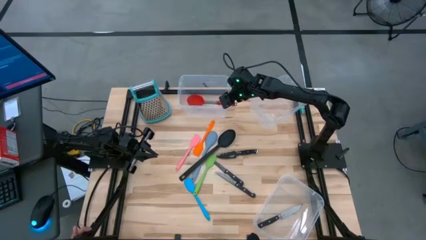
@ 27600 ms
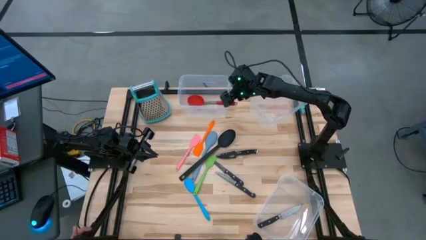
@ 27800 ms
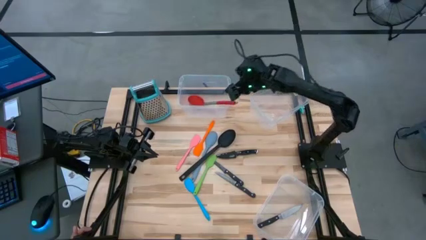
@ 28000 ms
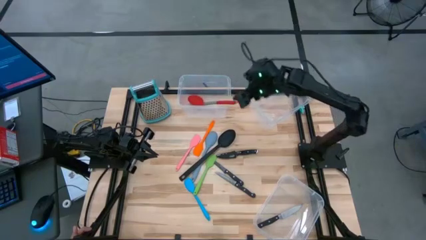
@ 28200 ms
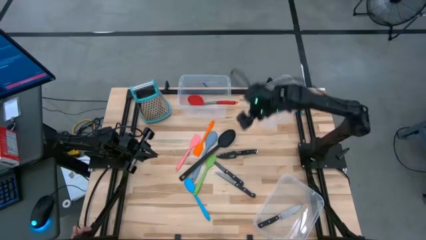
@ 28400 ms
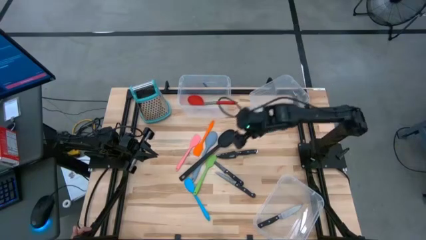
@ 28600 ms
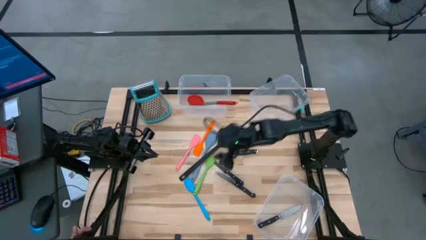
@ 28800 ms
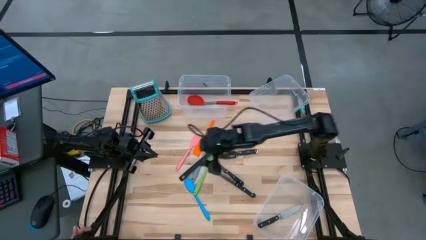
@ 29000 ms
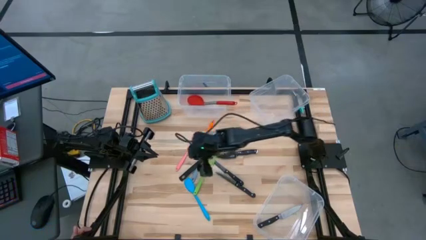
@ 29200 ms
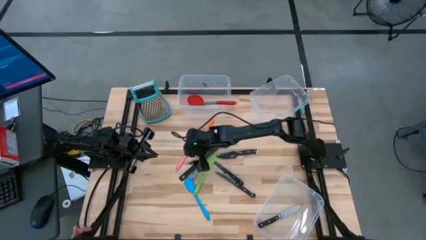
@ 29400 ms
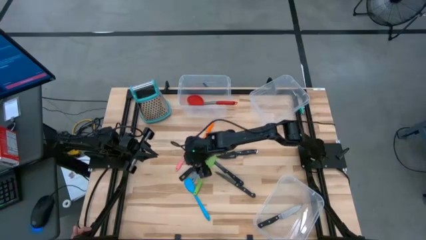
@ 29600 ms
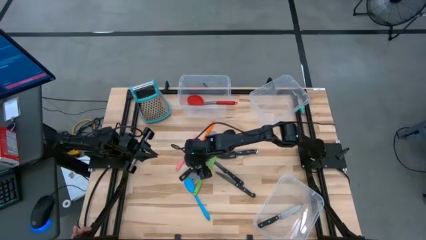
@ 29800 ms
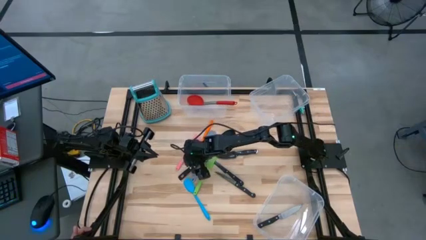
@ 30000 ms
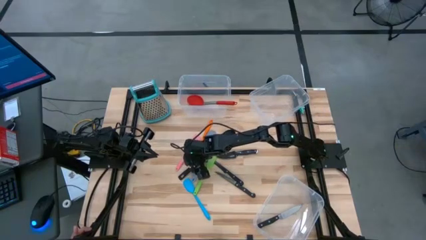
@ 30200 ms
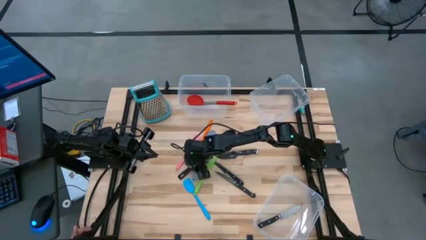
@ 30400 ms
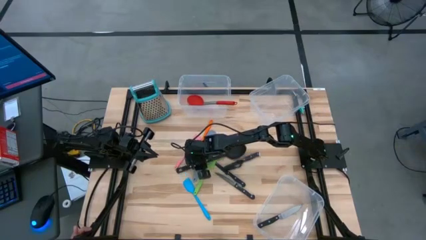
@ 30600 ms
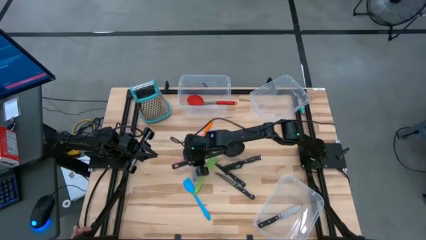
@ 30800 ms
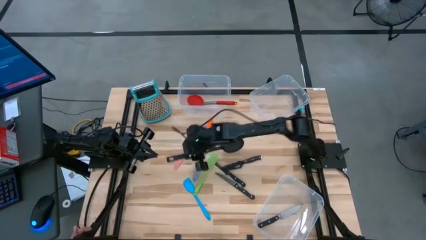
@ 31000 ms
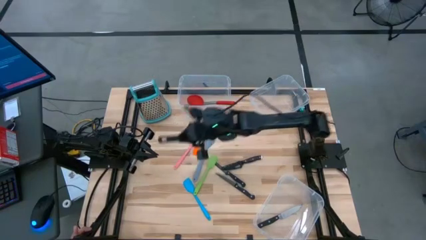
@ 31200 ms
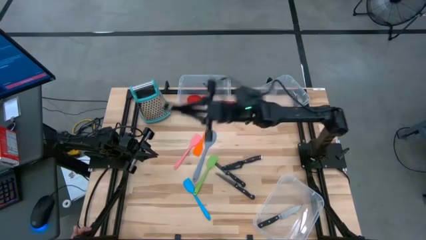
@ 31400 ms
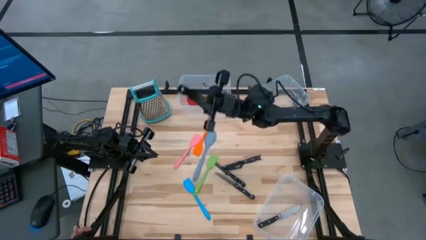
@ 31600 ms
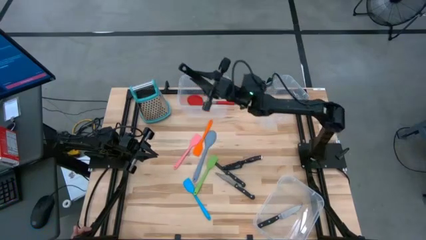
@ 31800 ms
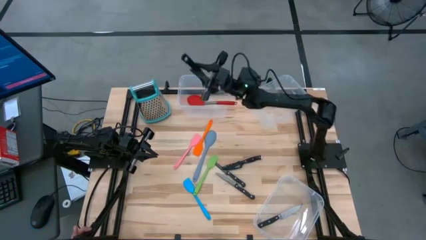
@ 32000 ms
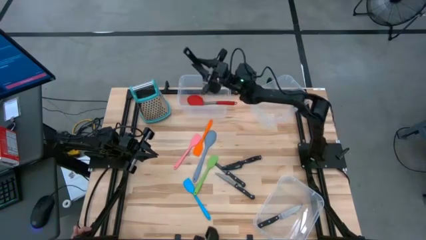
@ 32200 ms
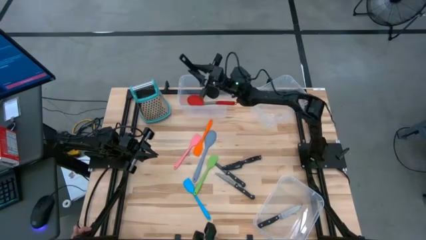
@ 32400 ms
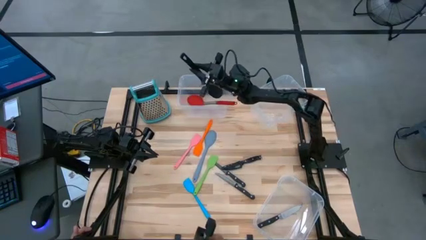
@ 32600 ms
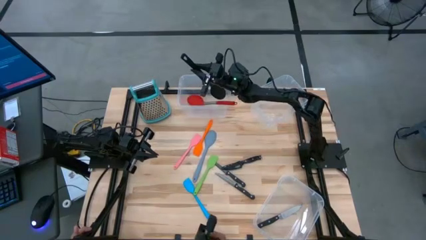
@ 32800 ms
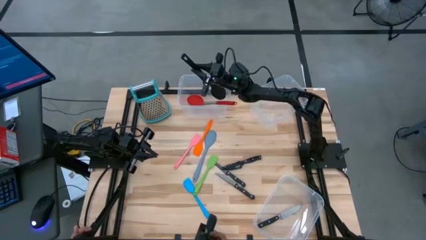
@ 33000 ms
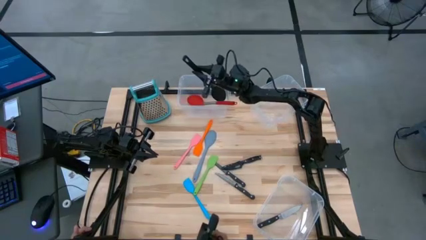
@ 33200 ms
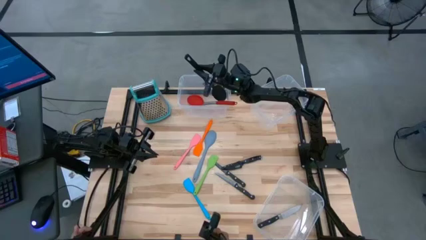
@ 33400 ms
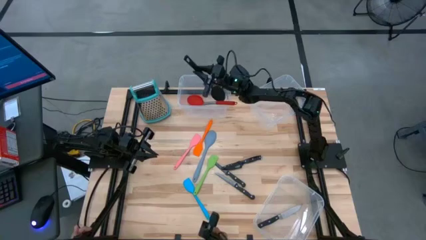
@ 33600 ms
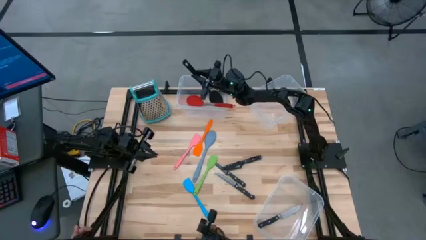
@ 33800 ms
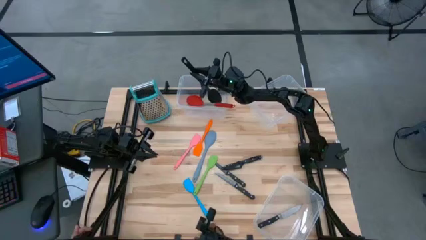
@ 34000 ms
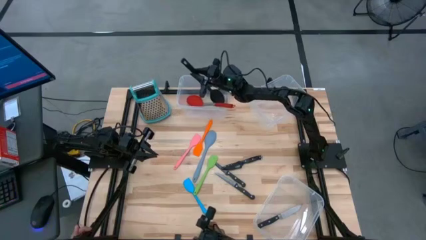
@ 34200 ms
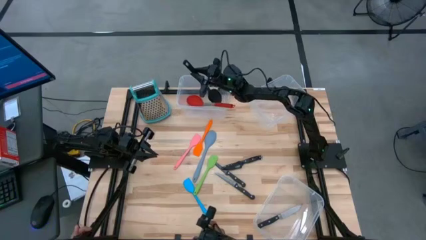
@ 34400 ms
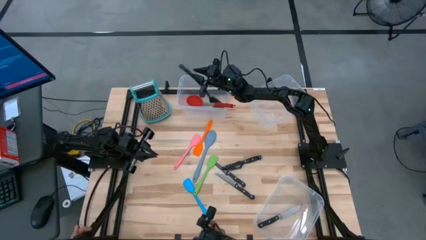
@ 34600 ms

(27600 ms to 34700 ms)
Task: Pick & Place Kitchen Items
Put the black serving spoon into the top left transparent bin

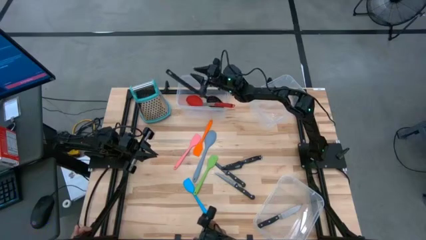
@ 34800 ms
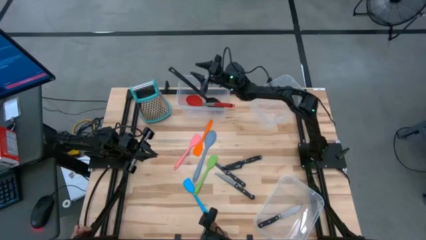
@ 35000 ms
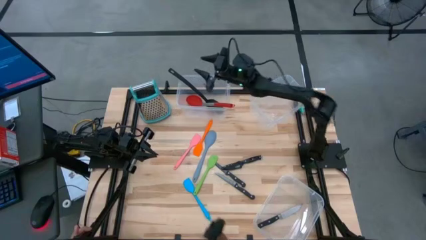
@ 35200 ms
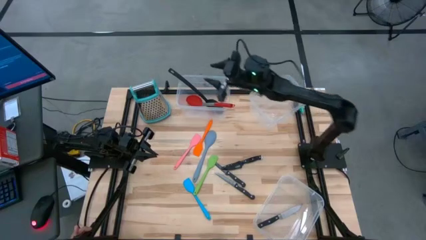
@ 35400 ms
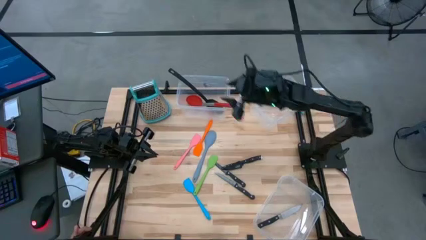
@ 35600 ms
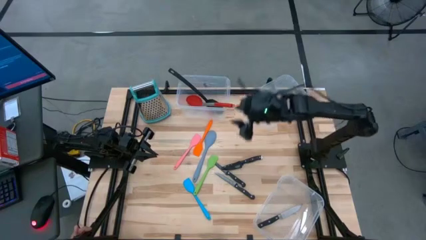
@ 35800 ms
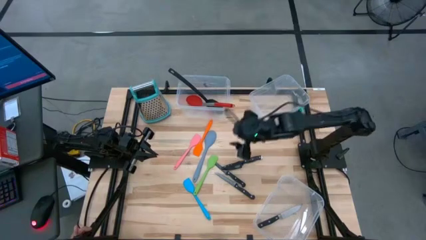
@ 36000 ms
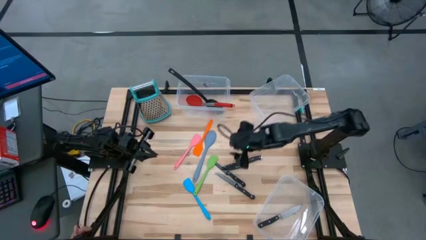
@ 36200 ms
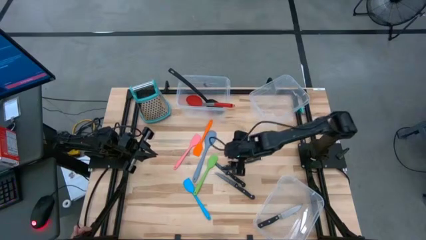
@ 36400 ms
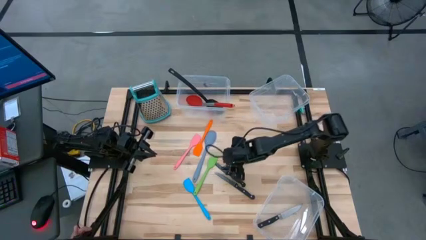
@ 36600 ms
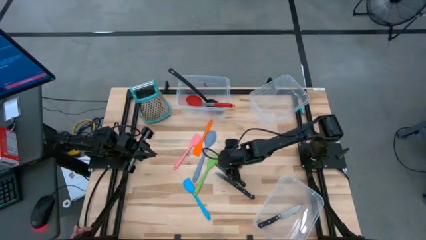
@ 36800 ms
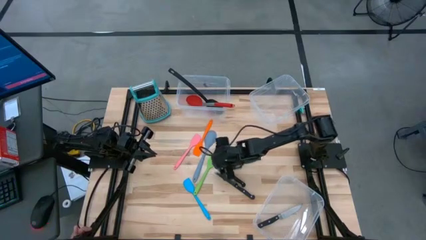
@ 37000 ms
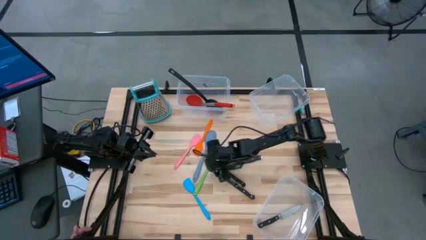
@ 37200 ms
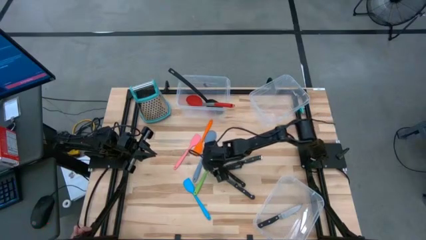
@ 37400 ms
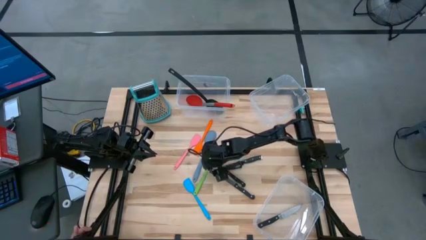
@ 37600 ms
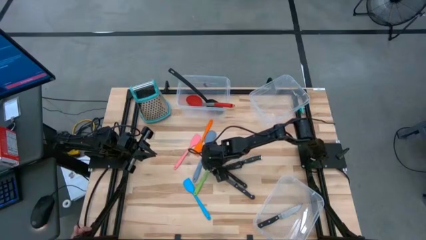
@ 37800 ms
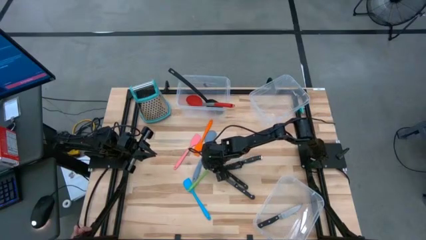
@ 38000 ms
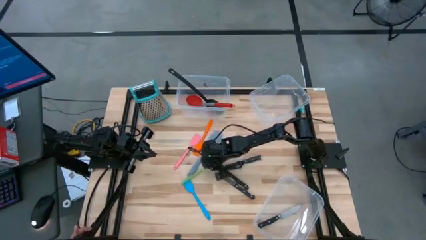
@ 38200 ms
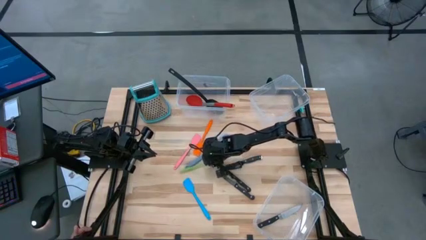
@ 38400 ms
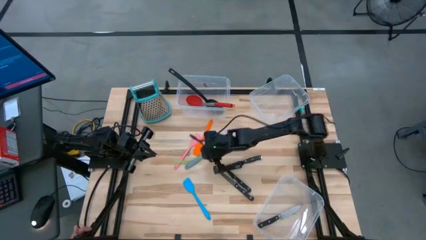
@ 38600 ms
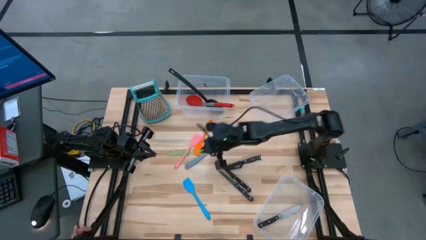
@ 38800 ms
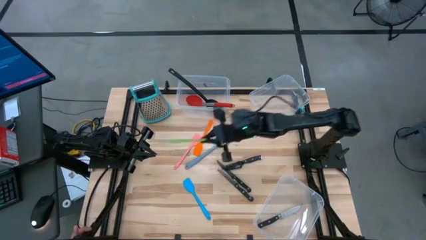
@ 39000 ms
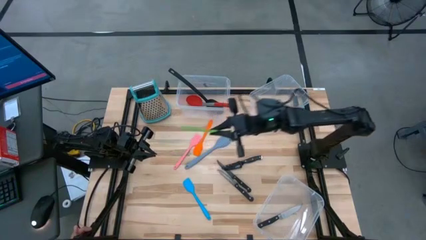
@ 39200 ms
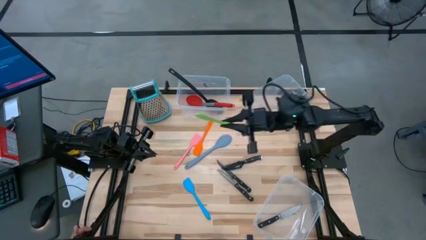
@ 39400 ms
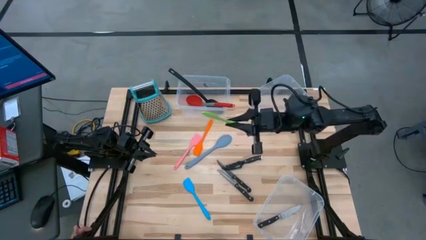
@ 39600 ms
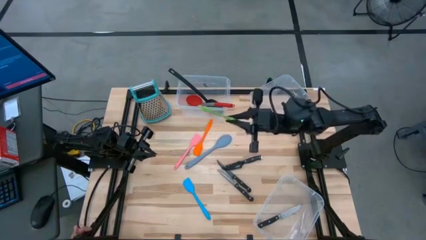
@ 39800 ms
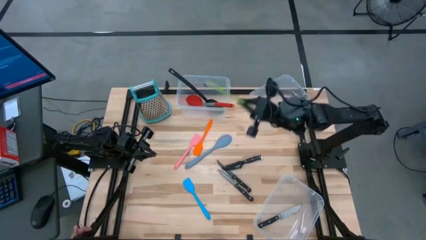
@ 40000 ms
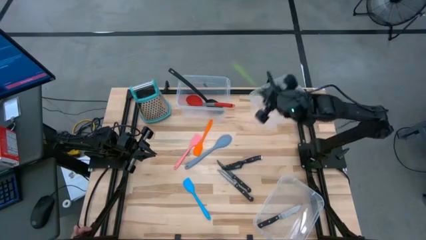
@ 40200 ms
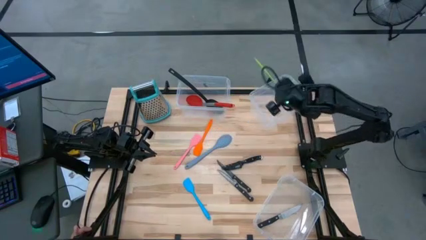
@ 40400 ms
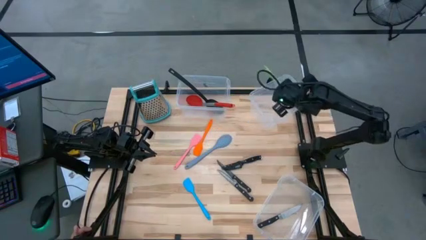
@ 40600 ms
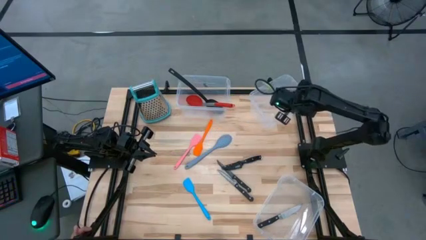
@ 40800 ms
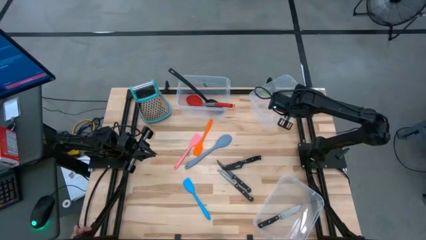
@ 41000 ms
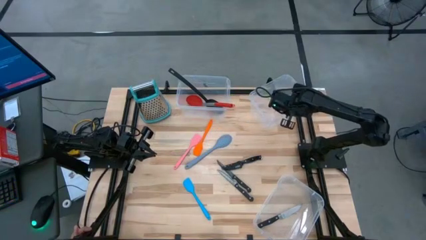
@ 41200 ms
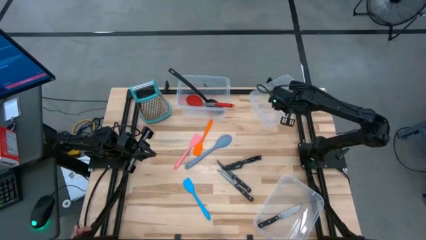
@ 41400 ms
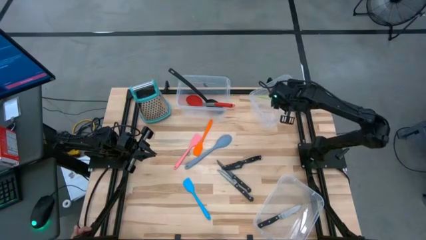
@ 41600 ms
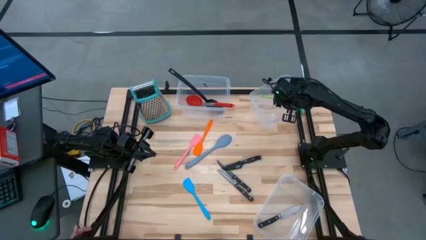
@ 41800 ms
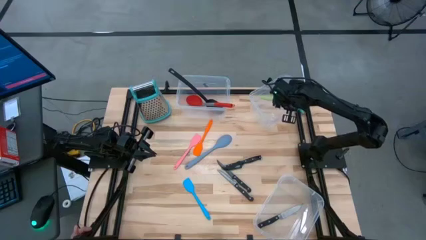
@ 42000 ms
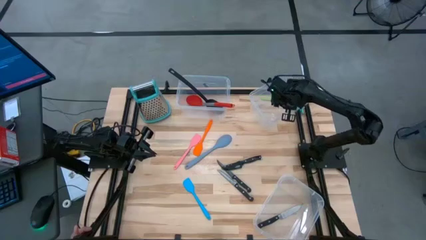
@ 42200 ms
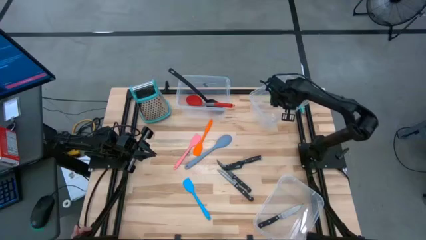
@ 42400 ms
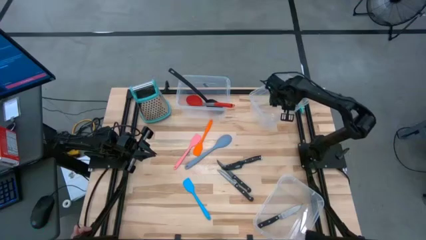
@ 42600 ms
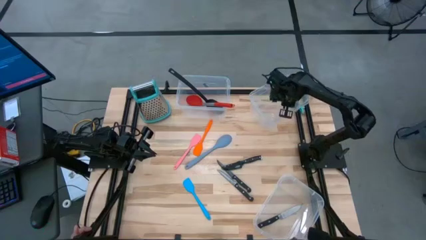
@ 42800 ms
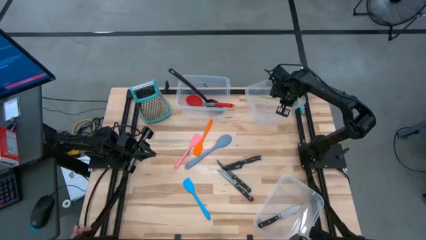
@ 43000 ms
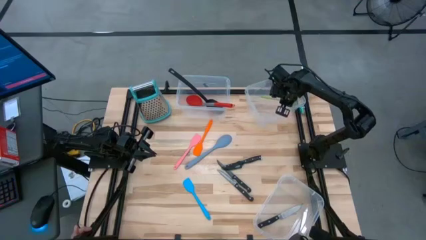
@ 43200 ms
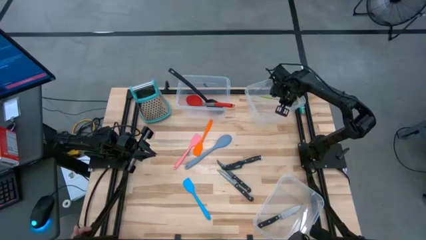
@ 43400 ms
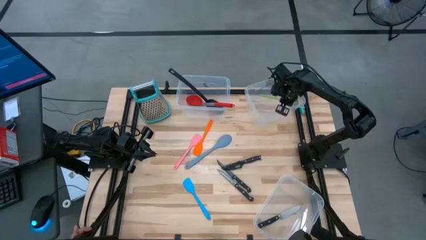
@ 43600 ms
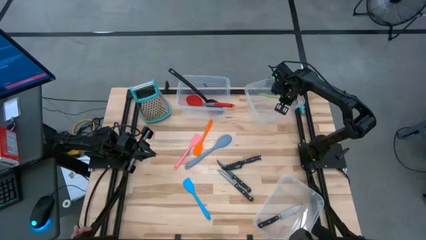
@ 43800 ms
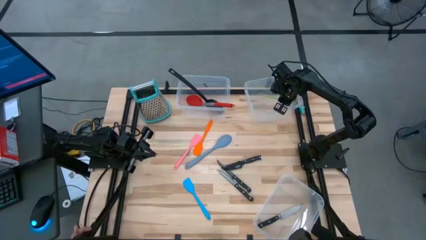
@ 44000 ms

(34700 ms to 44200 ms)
Put the green spatula into the top right transparent bin
